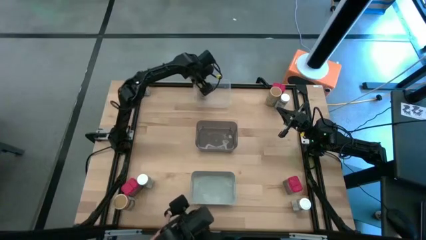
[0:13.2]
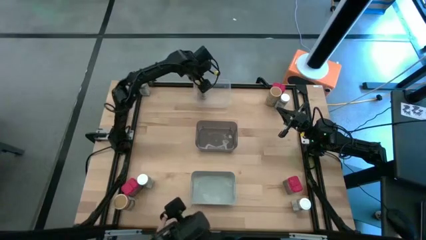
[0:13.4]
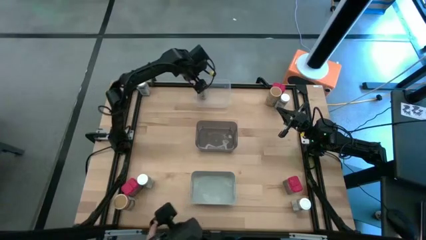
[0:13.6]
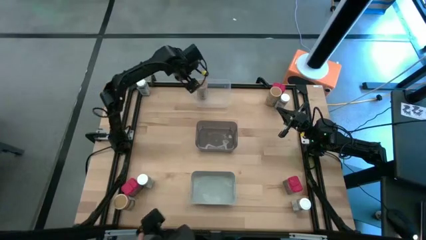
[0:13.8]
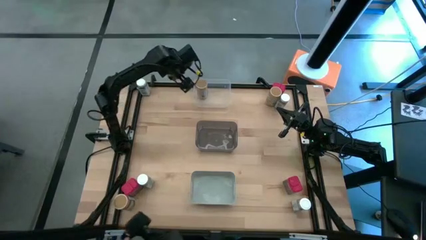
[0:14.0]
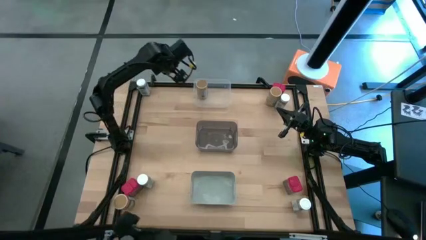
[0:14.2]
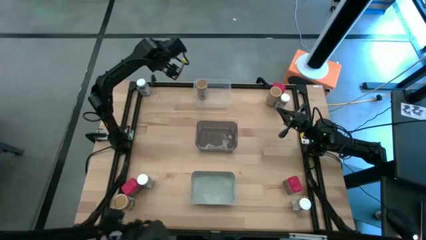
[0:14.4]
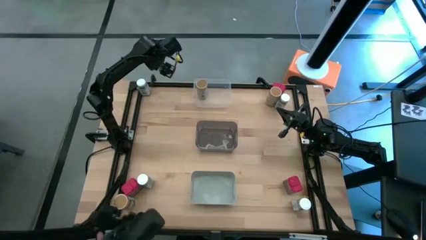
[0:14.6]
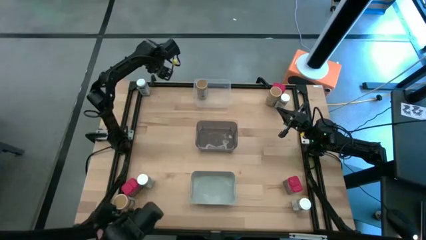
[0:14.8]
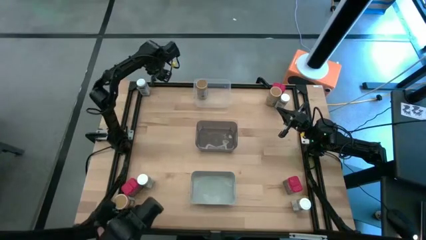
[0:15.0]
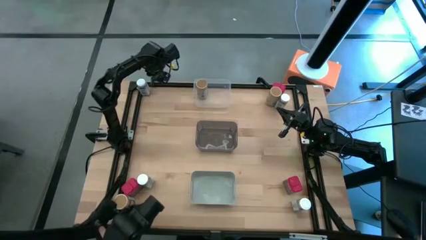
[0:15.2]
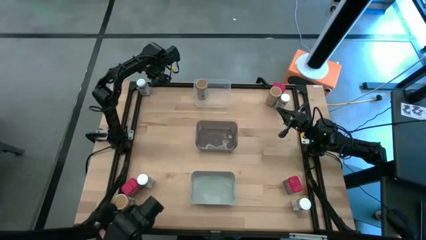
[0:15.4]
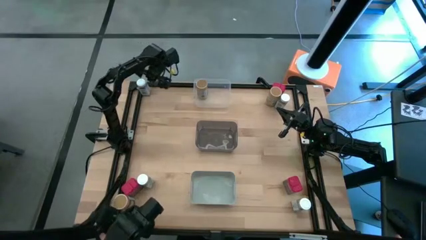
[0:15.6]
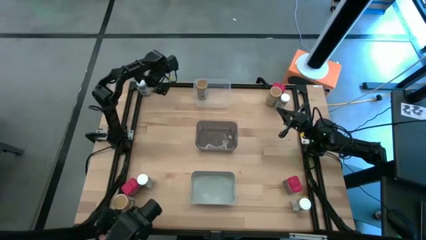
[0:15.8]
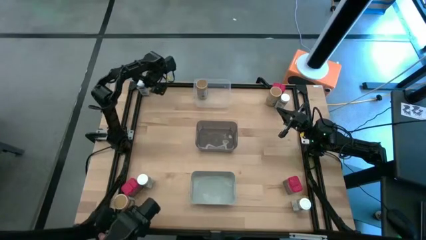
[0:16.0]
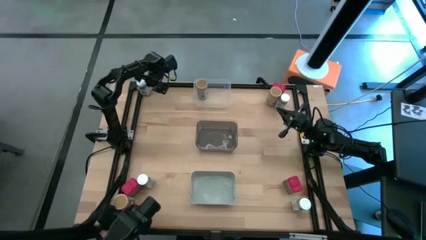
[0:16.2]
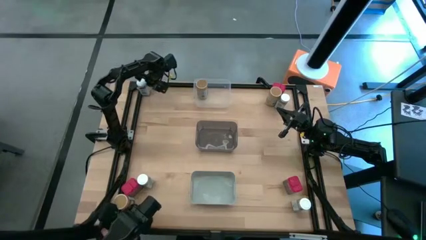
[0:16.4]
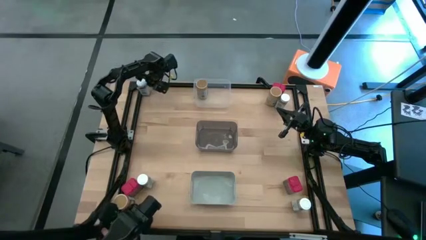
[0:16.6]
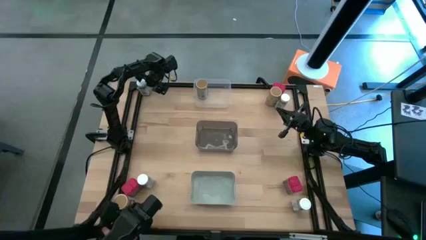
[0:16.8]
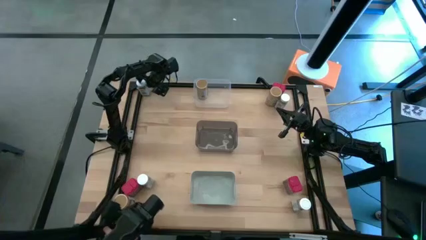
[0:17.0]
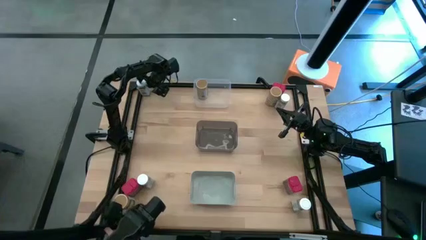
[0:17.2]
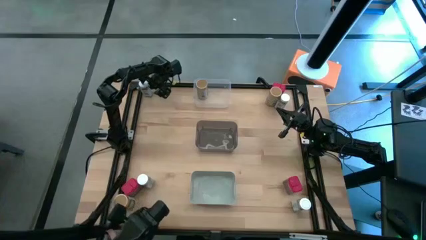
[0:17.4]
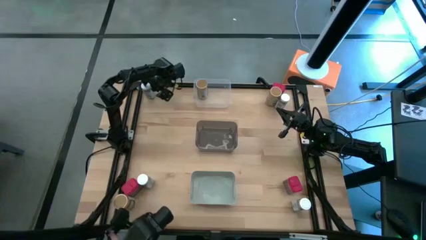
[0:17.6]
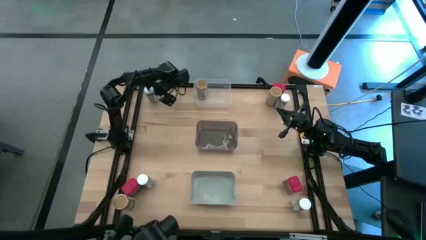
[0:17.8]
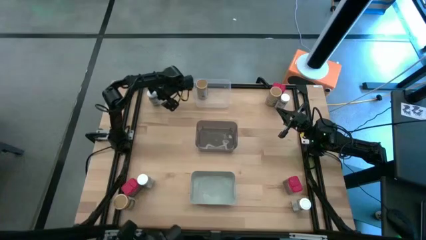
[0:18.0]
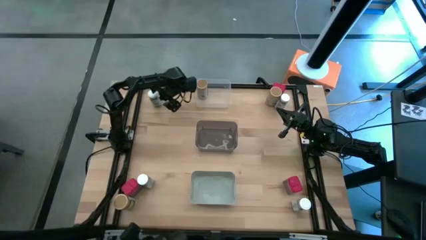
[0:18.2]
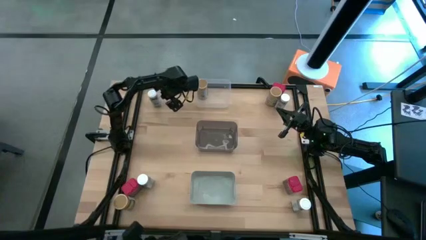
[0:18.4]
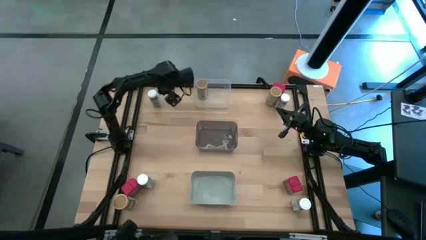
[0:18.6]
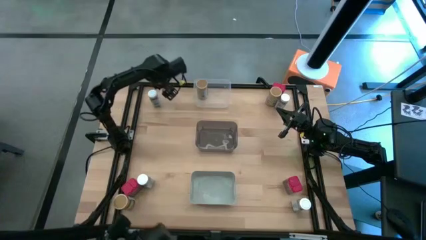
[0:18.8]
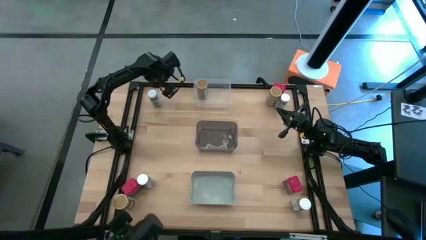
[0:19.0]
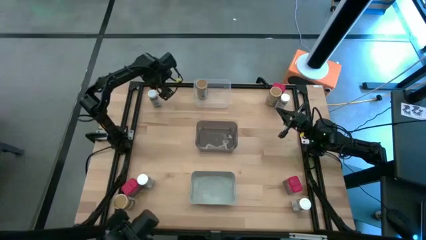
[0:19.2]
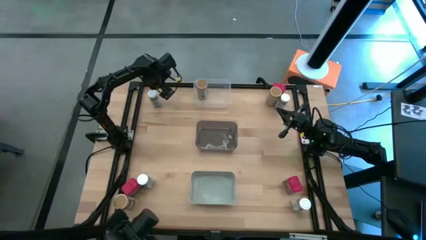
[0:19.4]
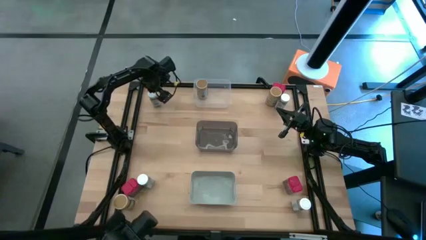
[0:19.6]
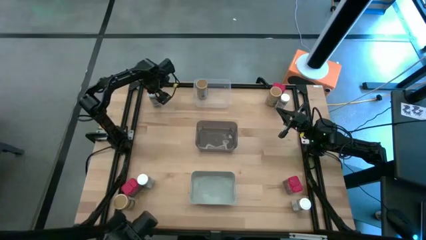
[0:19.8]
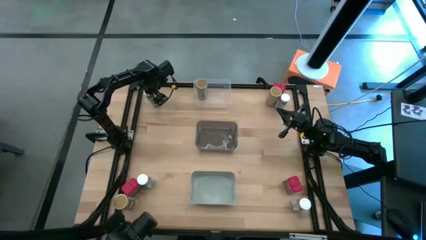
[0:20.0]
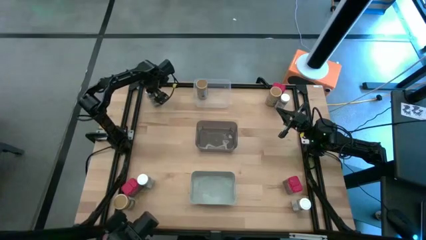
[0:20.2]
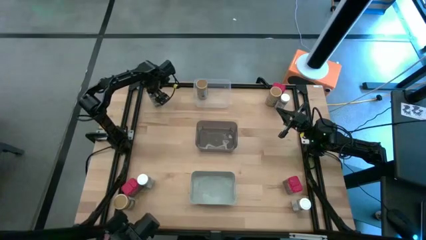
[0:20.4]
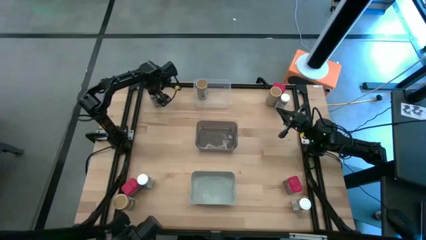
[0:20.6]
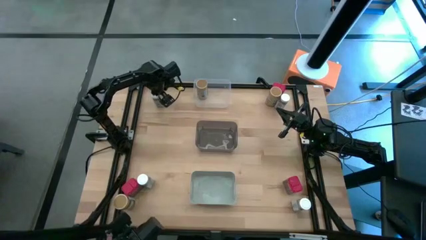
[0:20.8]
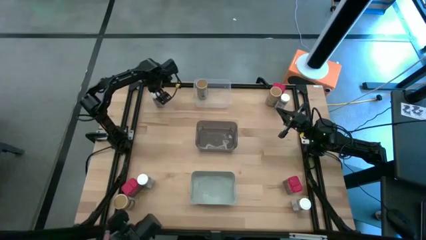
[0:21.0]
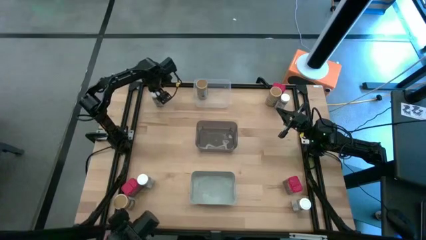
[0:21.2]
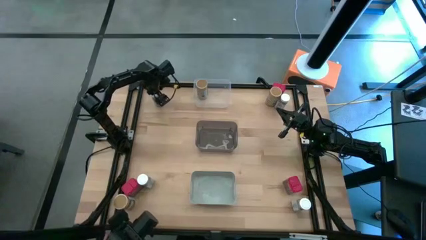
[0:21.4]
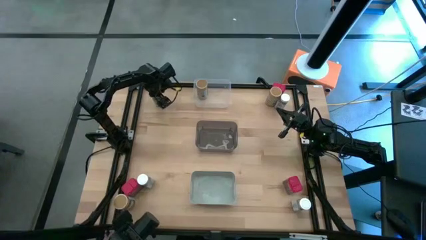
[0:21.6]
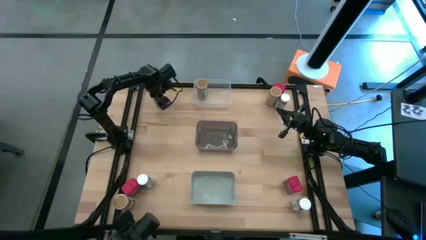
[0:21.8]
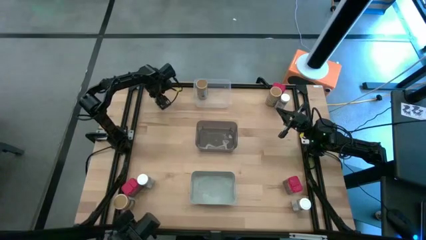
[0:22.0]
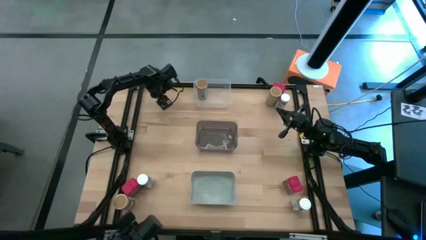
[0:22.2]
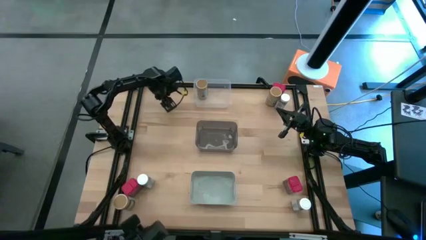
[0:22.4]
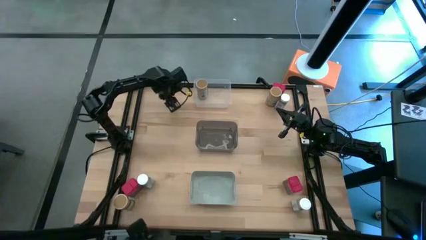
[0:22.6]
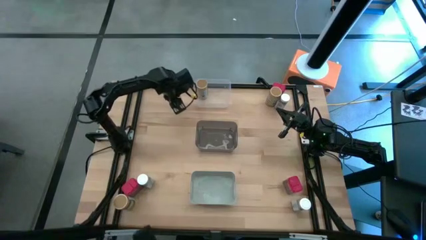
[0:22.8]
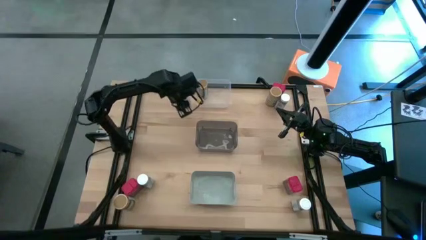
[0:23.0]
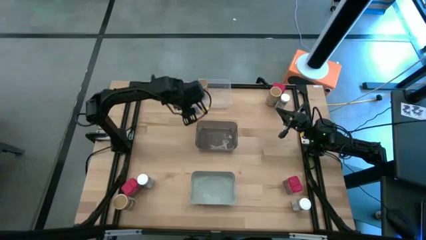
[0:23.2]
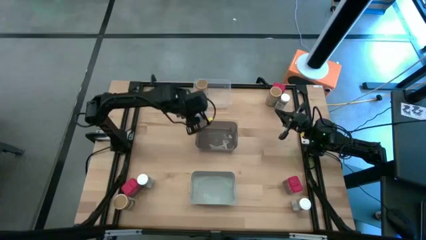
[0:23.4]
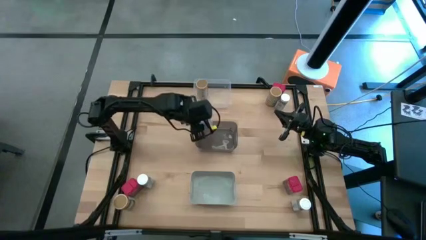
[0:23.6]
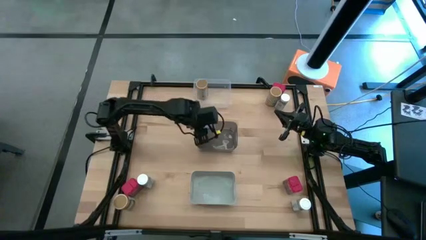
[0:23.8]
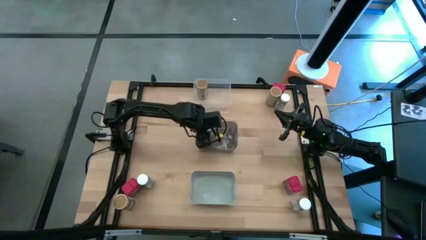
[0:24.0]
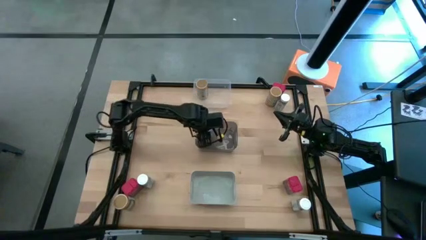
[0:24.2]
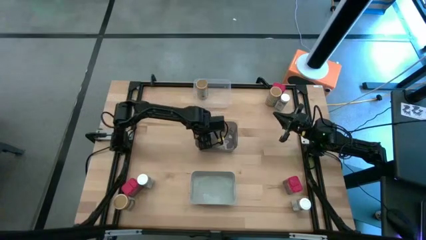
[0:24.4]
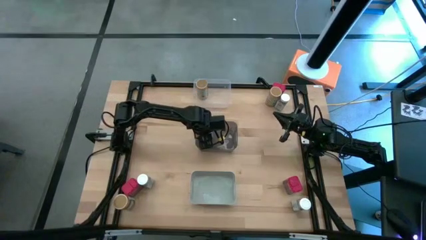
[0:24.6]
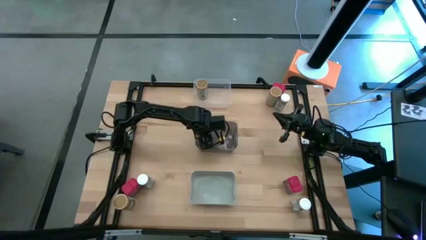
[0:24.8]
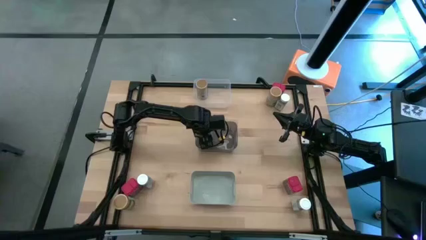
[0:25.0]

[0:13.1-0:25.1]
Task: Sort spices by type
Put the top left white seasoning bottle into the black bin
